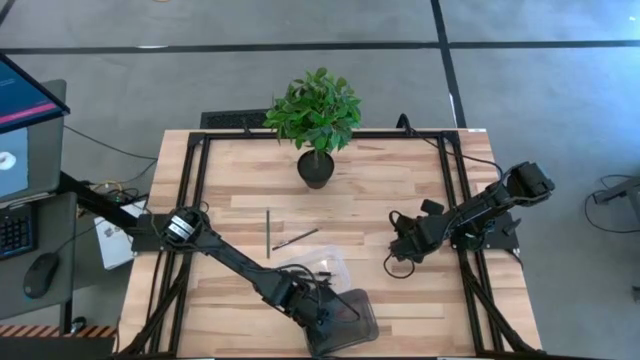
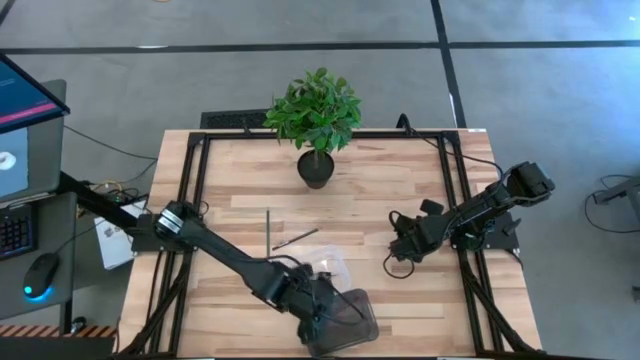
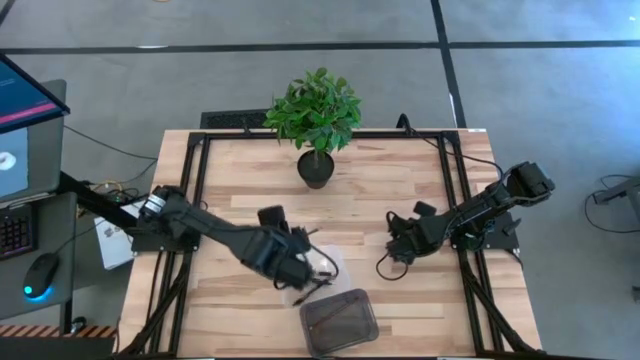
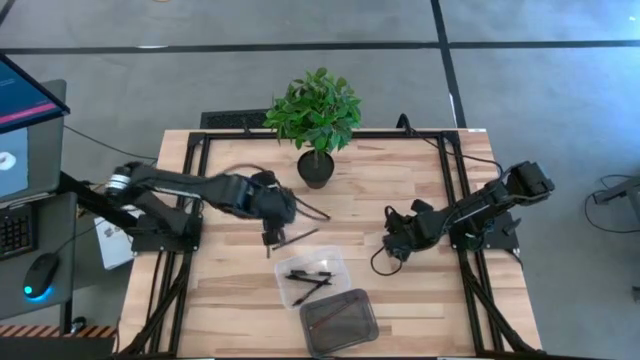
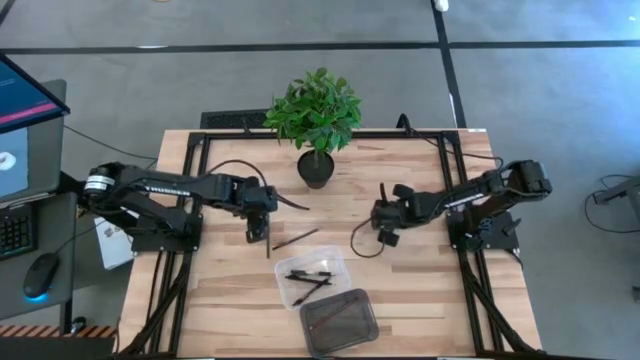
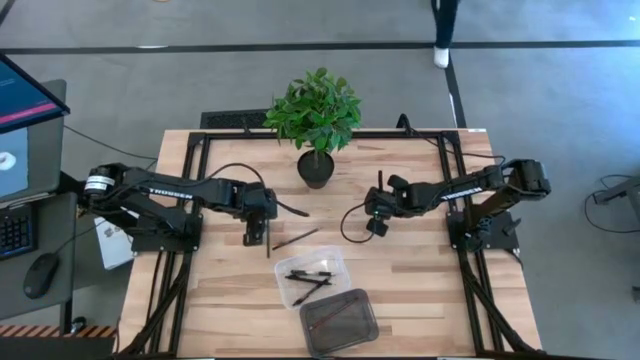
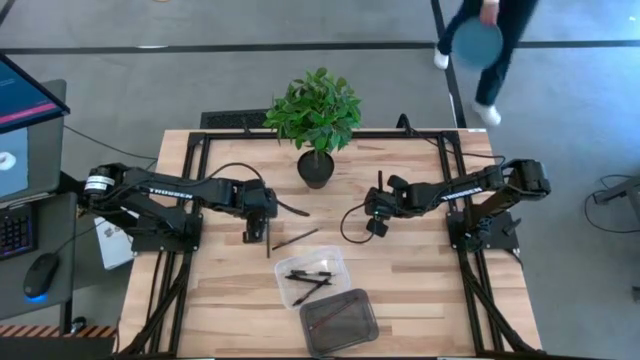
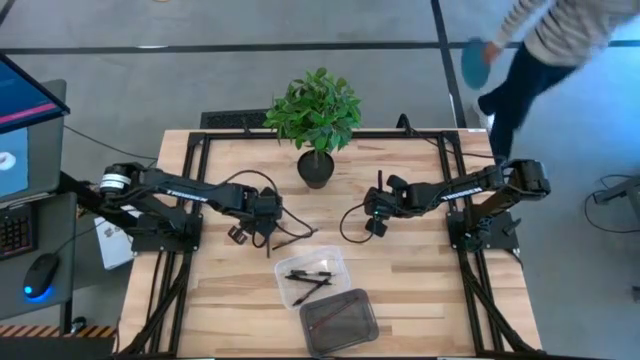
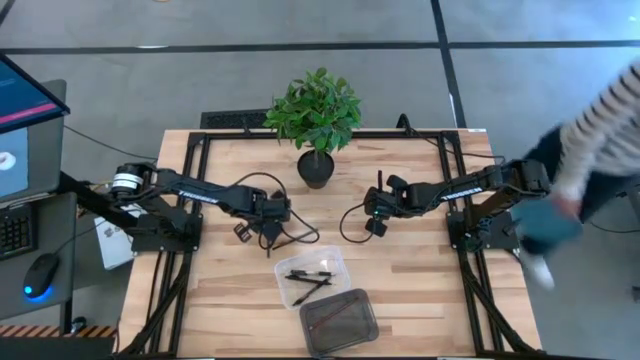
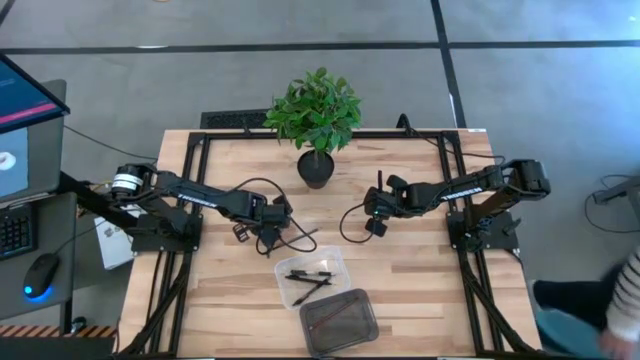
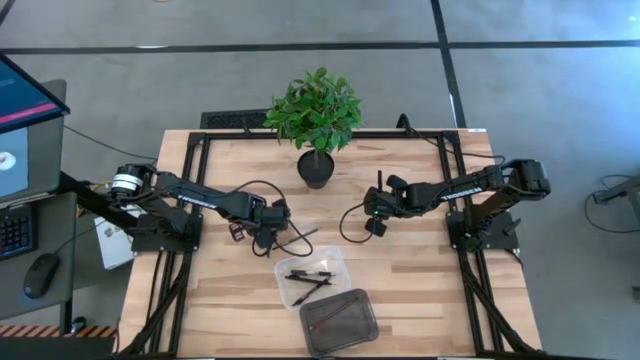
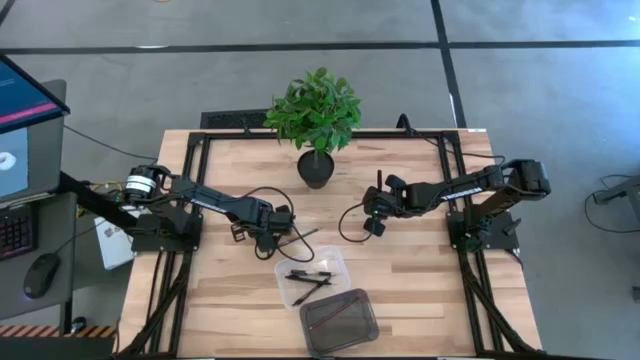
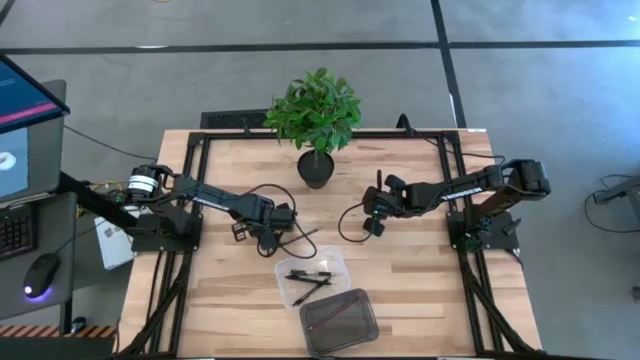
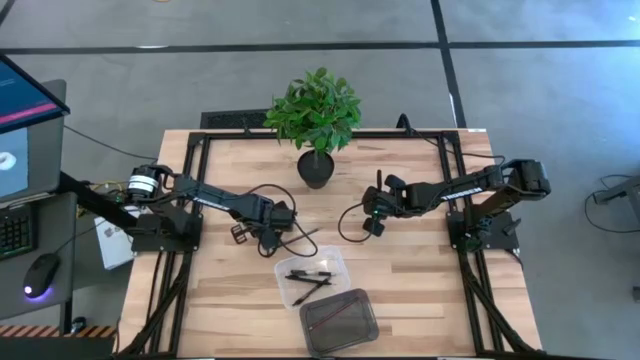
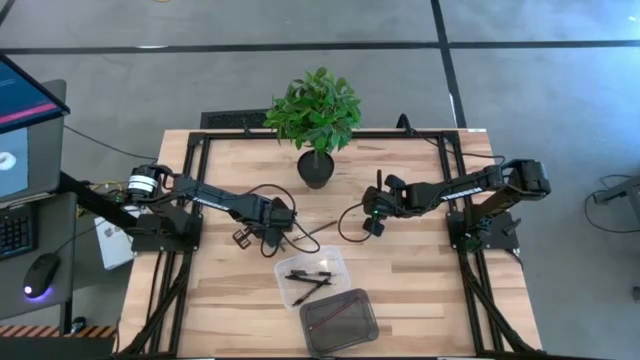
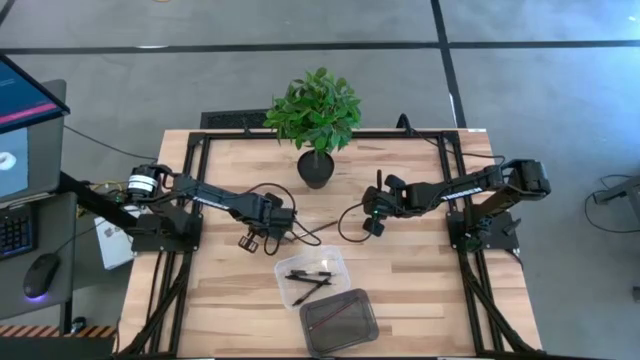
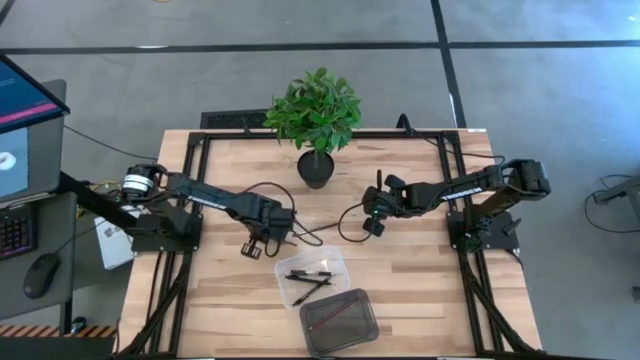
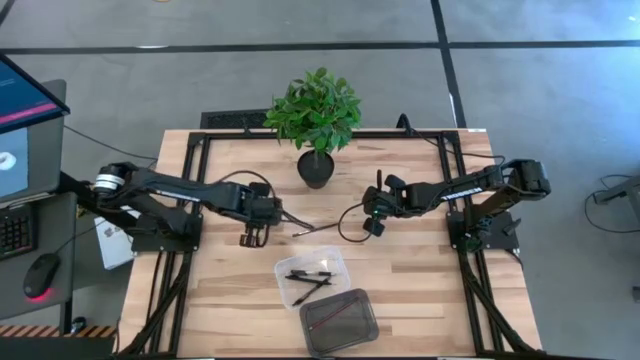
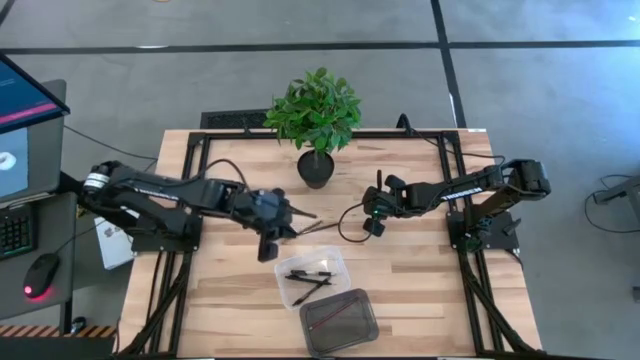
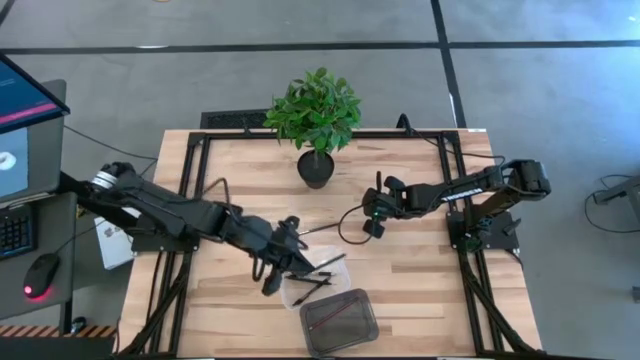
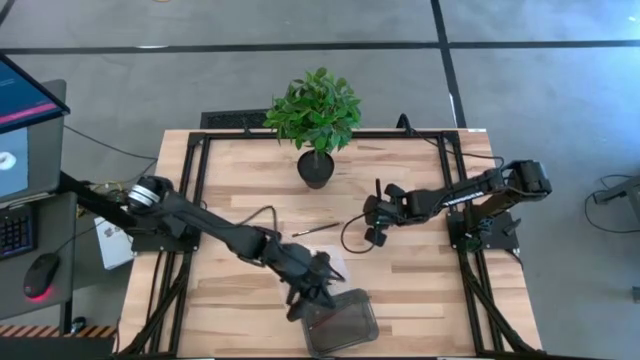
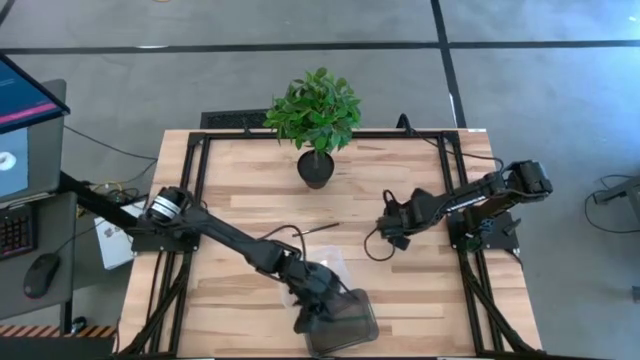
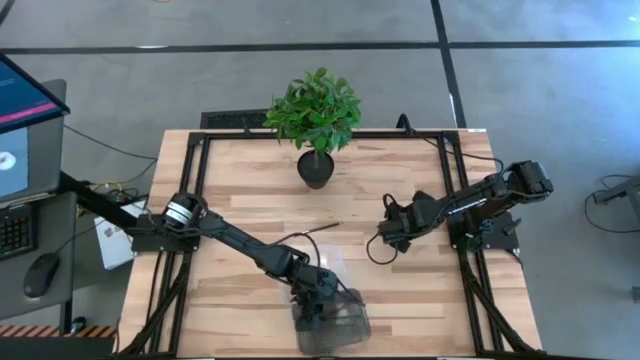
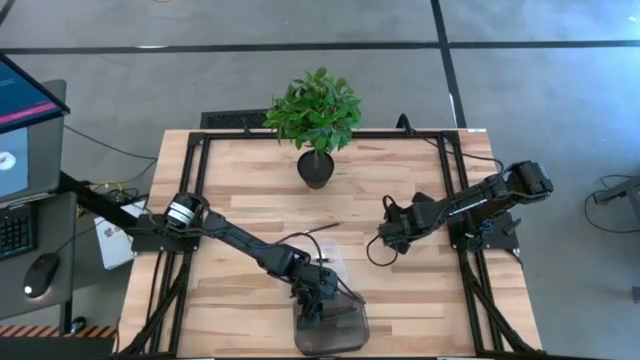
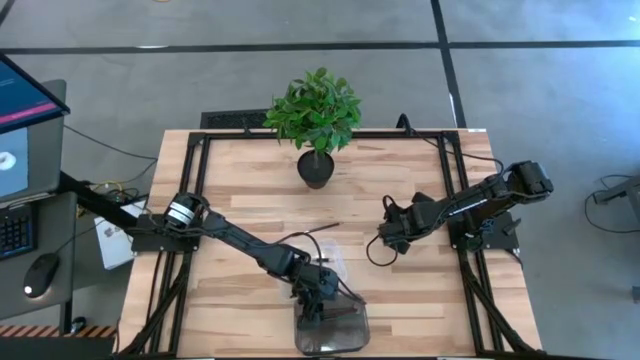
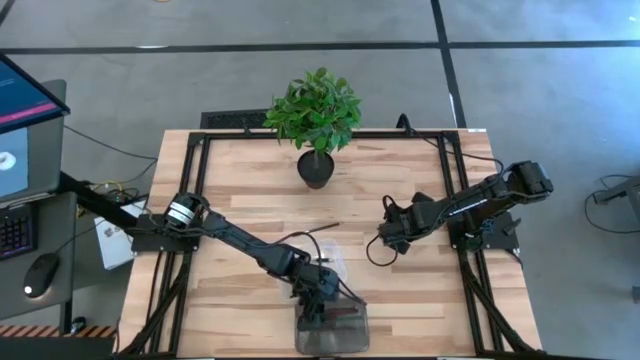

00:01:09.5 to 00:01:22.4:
Task: Sort pens & pencils
Put the green pencil into the black bin
